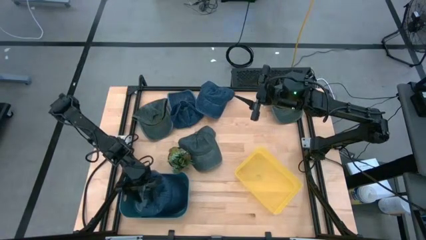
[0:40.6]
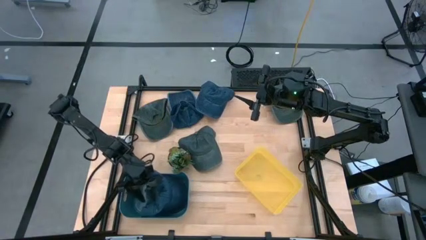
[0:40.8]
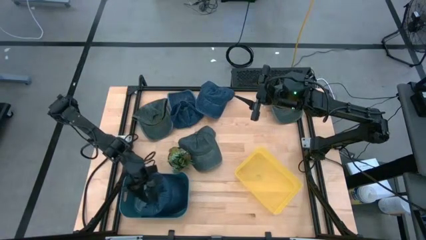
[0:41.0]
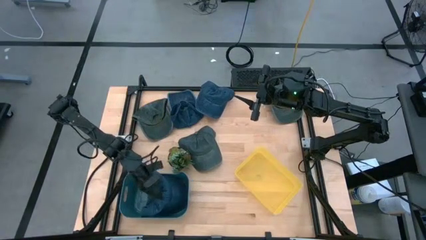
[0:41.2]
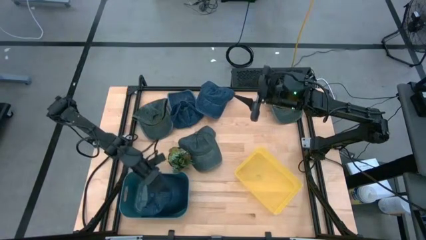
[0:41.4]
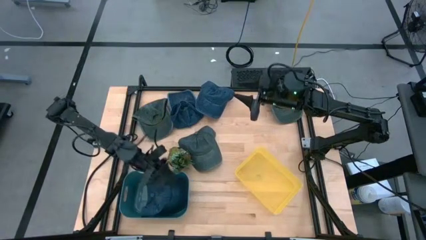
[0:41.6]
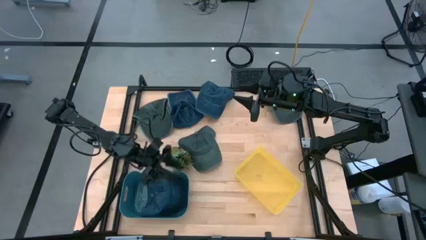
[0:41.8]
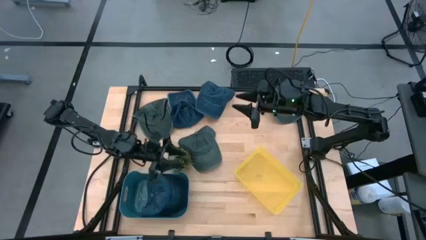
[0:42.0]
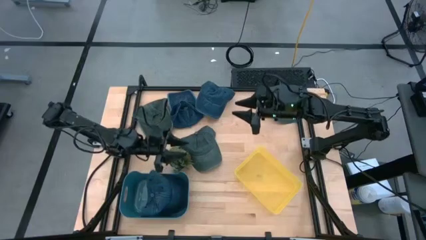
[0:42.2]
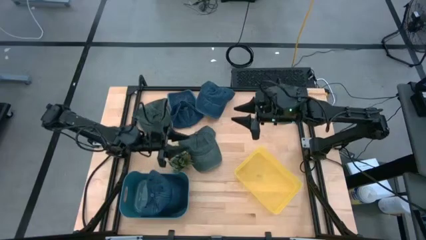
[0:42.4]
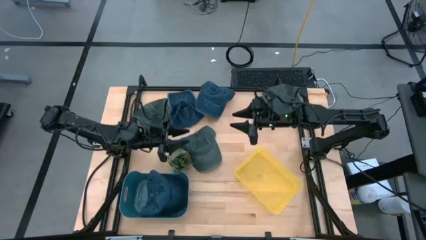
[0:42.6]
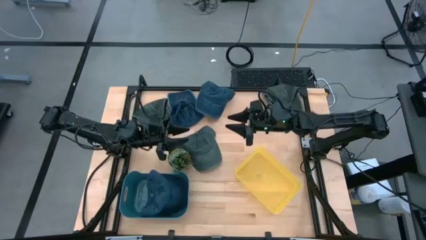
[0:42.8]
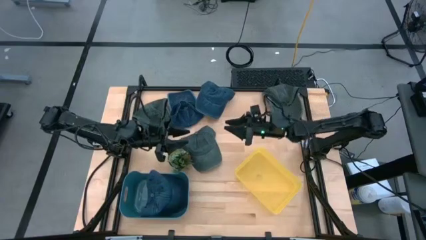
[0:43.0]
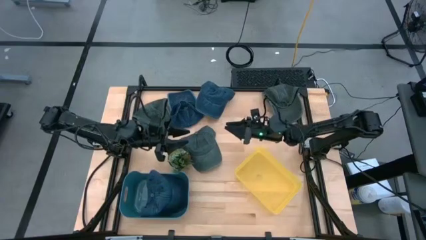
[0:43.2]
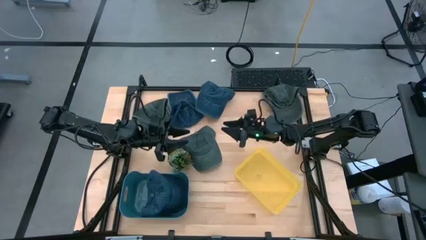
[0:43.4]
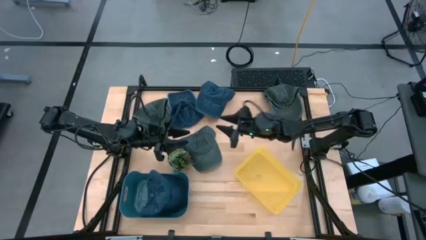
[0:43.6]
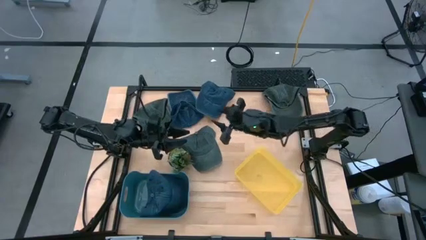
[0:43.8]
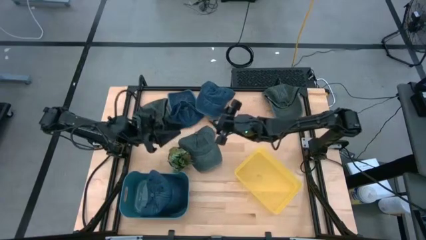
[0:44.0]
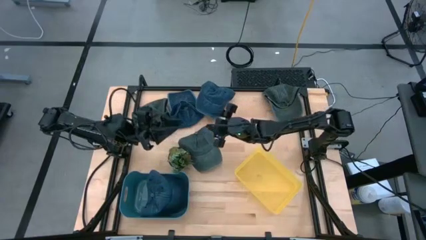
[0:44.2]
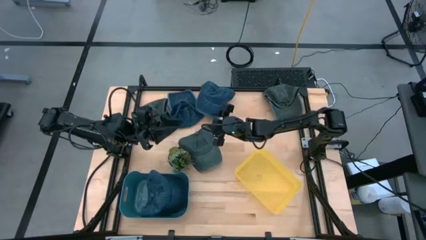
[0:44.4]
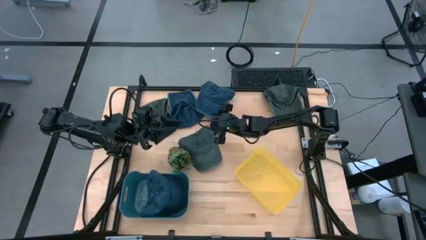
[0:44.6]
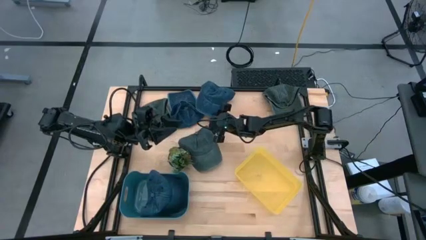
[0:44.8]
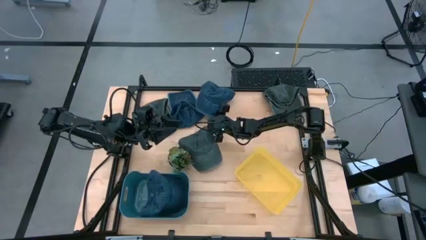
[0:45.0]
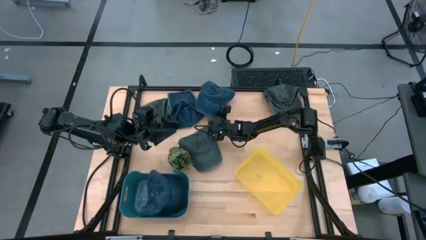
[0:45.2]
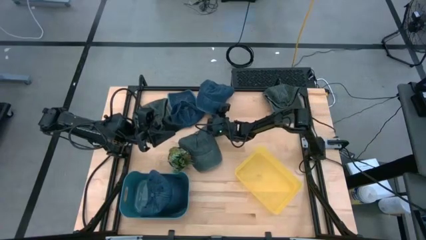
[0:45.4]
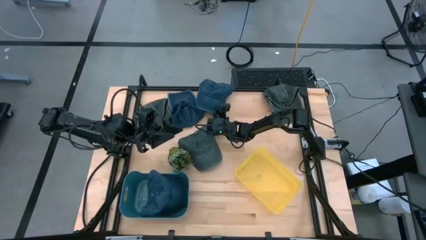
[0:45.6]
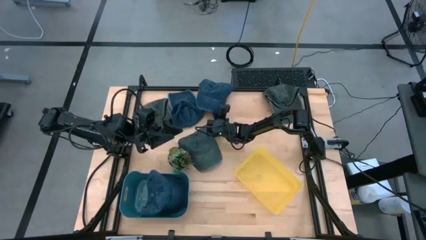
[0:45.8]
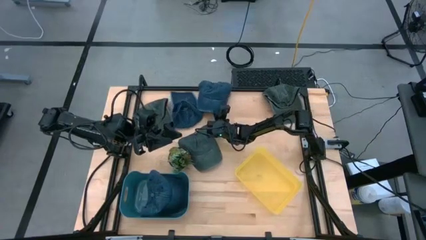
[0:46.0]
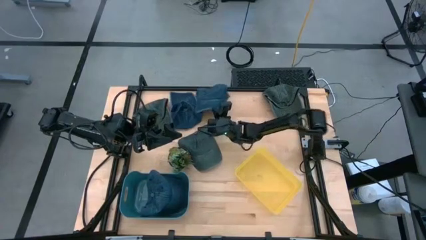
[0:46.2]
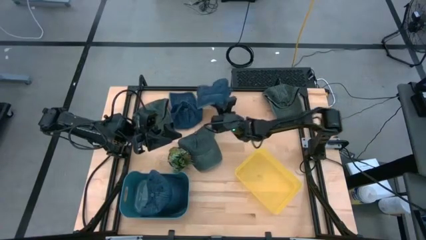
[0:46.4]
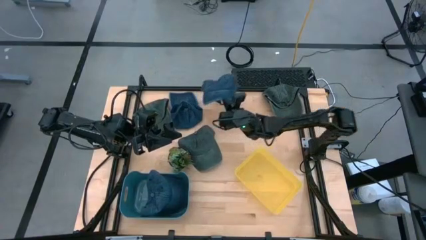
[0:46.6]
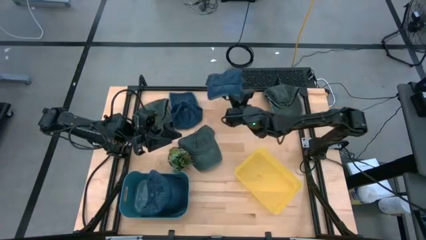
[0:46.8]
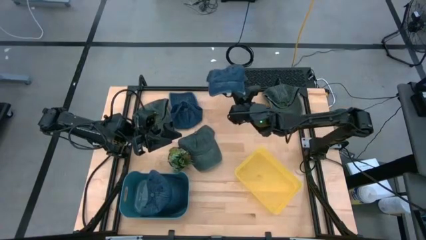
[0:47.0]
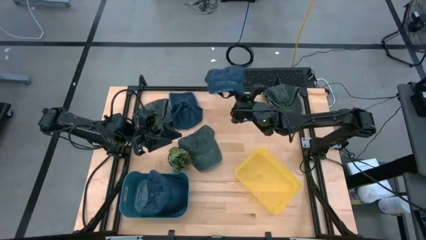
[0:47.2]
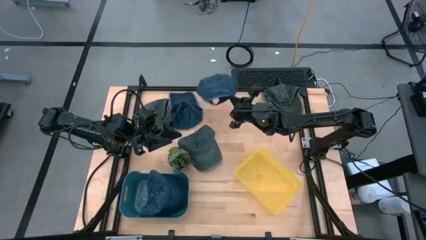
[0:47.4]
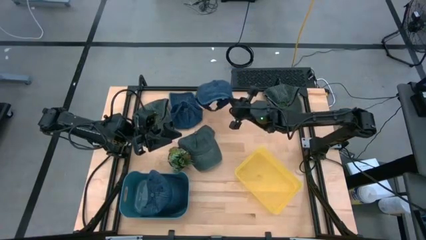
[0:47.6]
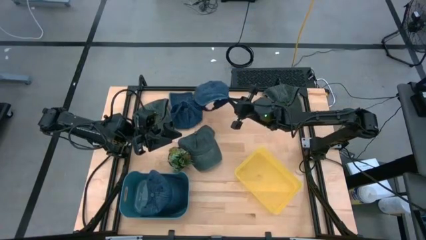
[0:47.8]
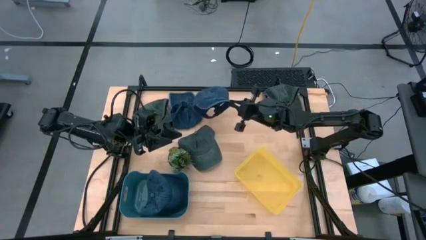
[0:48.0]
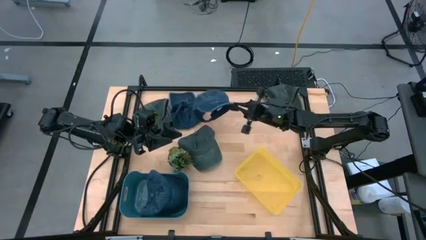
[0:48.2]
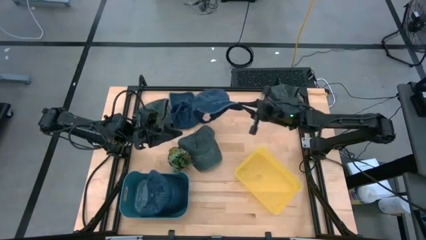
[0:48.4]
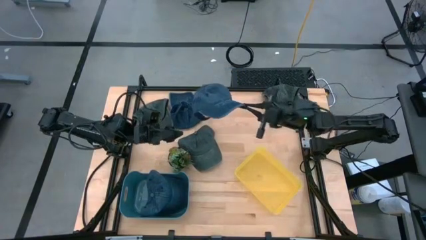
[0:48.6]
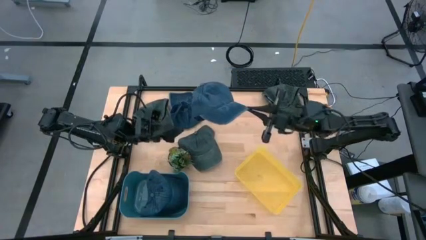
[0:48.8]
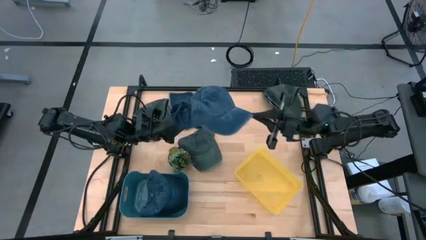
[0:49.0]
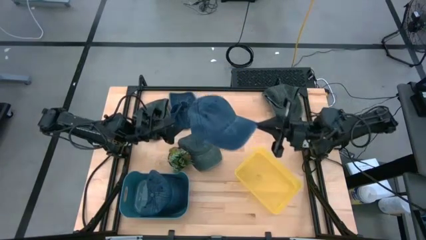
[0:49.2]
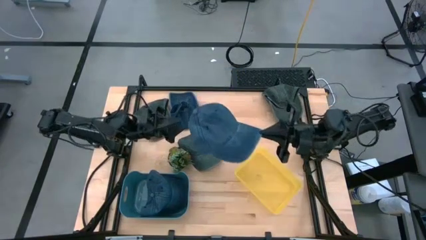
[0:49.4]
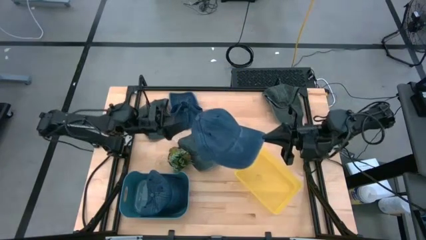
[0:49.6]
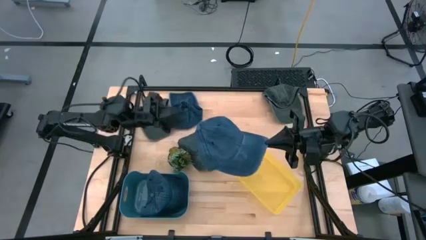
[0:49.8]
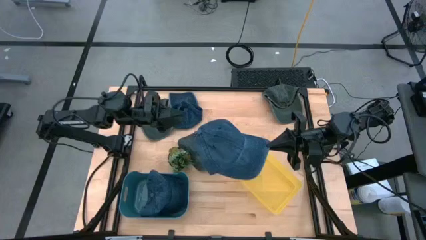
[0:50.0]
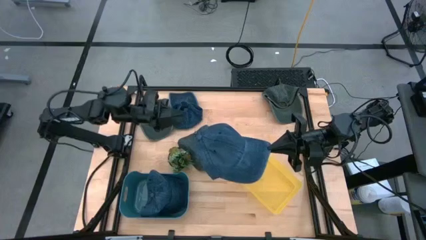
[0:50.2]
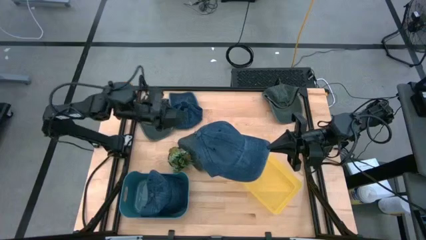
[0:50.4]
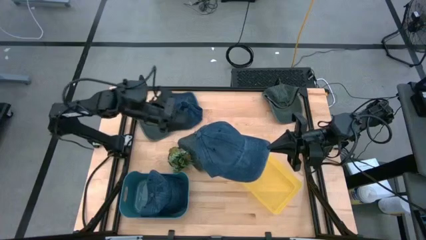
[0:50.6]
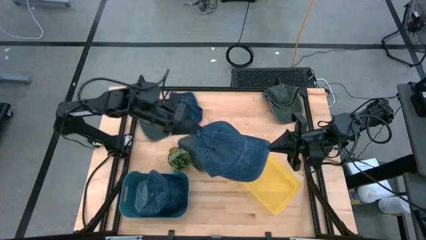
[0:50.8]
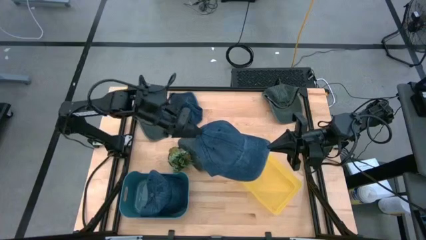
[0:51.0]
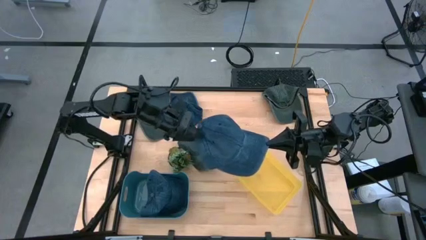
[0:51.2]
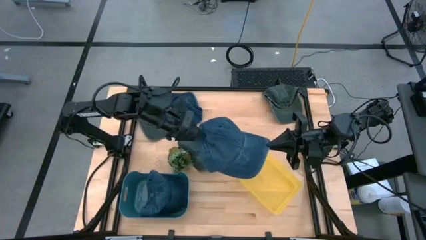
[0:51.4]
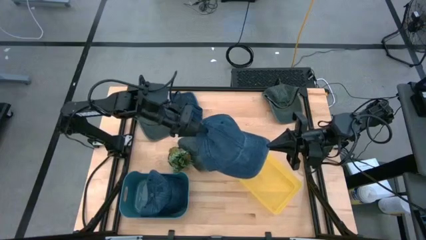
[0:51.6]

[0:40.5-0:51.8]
Task: Pick & Place hat
Put the right blue cap into the blue bin
